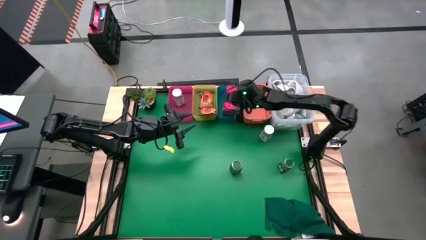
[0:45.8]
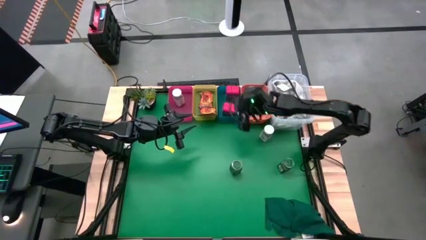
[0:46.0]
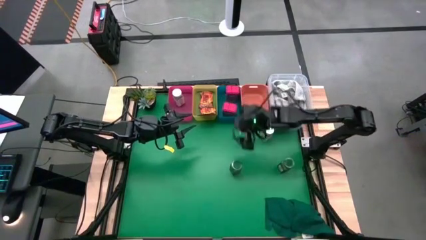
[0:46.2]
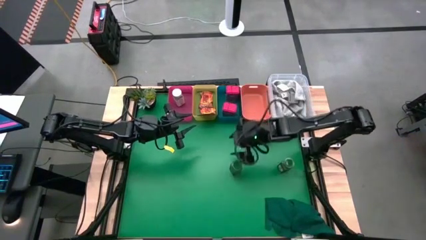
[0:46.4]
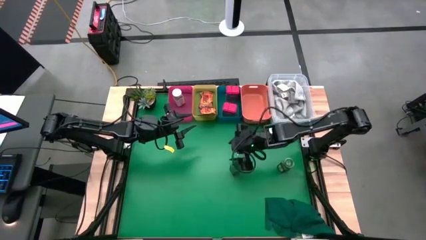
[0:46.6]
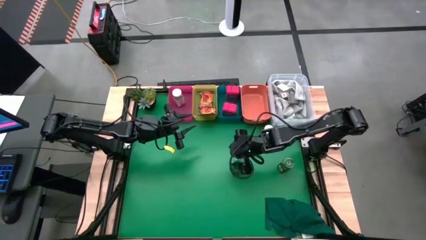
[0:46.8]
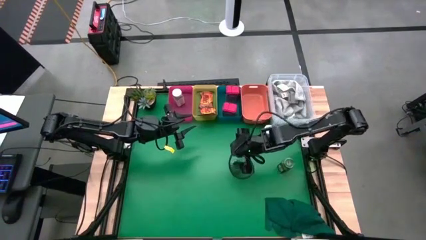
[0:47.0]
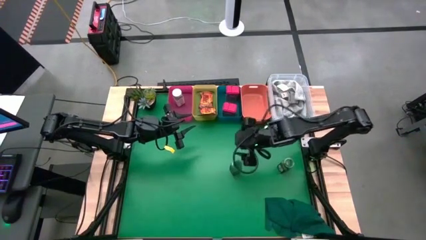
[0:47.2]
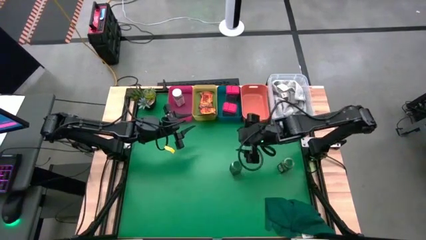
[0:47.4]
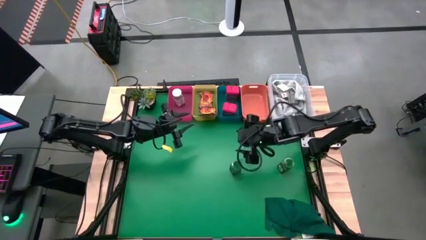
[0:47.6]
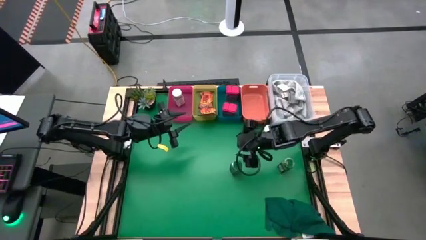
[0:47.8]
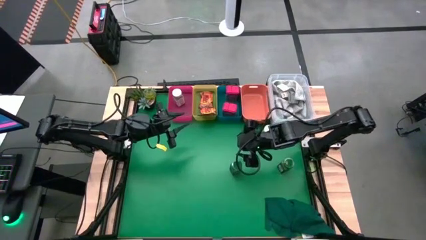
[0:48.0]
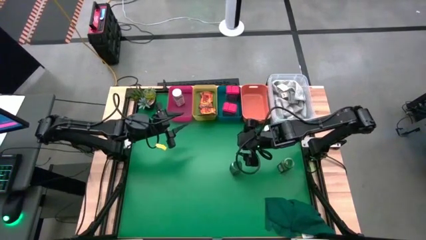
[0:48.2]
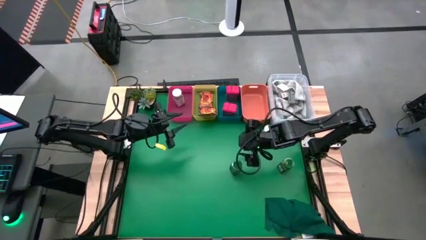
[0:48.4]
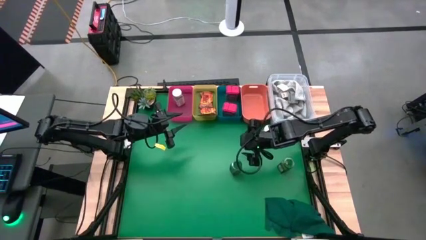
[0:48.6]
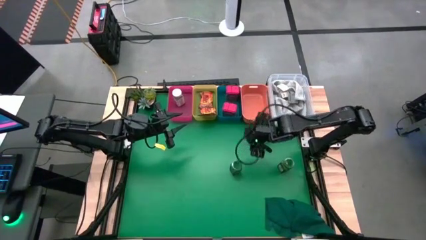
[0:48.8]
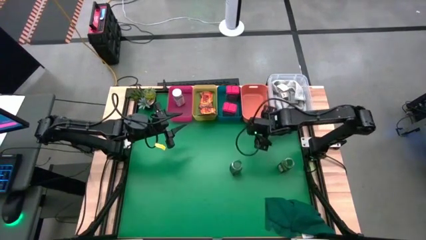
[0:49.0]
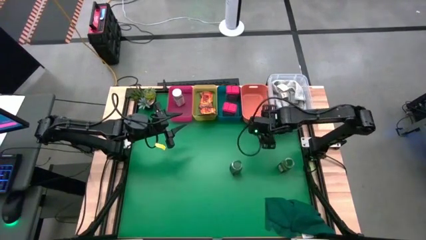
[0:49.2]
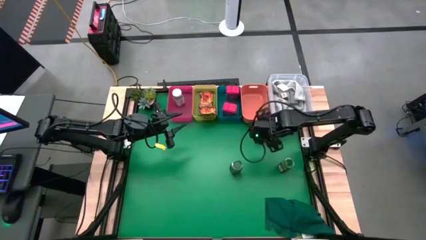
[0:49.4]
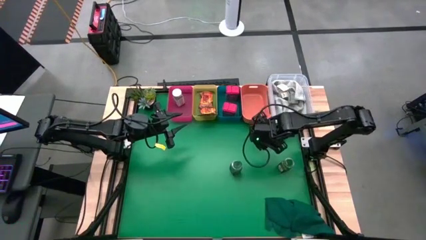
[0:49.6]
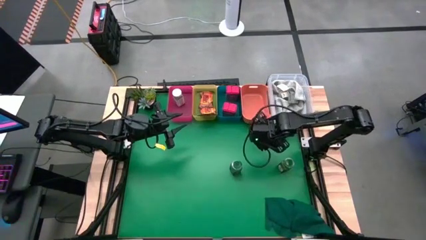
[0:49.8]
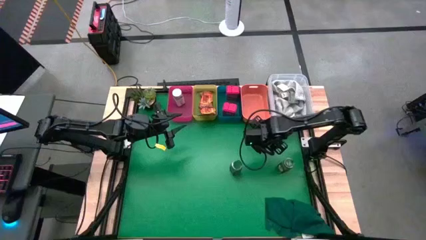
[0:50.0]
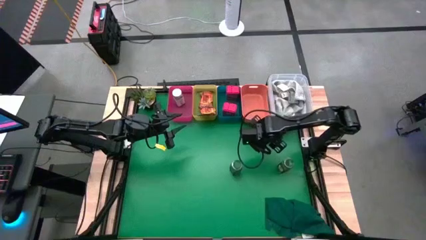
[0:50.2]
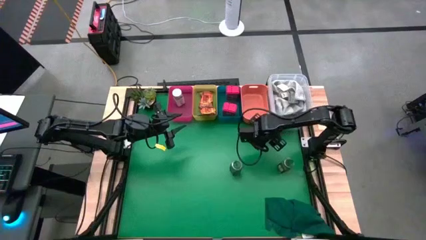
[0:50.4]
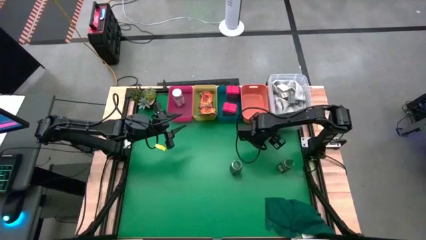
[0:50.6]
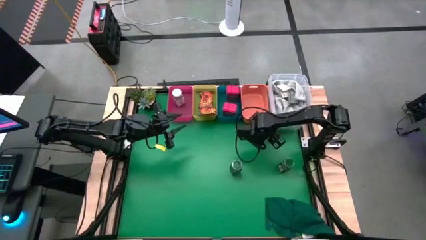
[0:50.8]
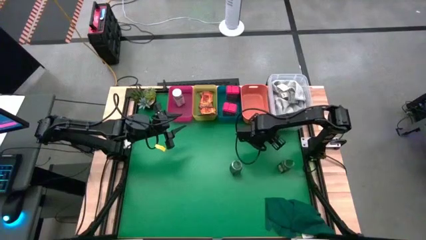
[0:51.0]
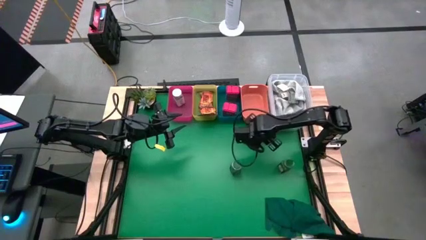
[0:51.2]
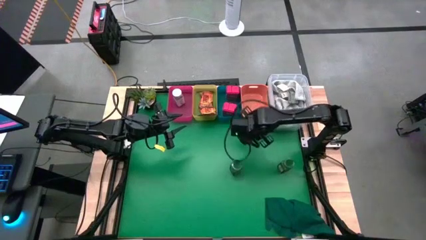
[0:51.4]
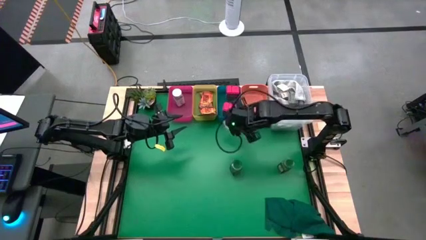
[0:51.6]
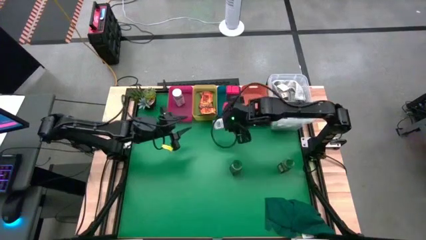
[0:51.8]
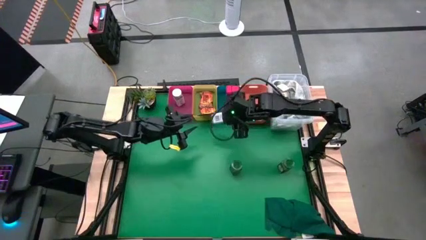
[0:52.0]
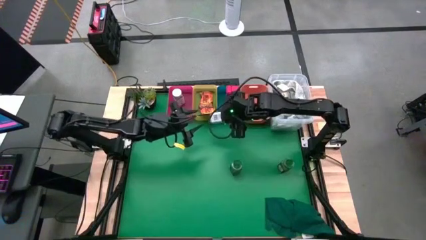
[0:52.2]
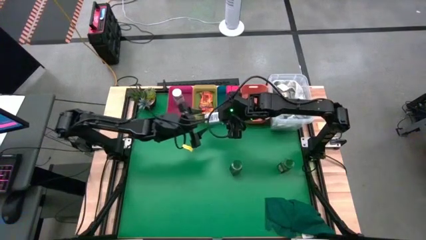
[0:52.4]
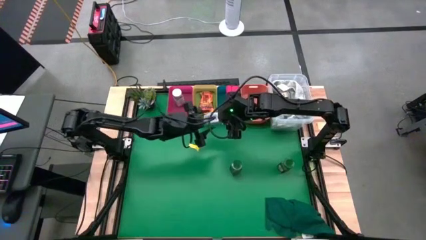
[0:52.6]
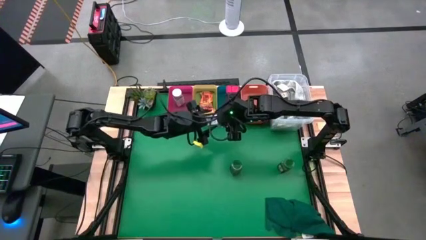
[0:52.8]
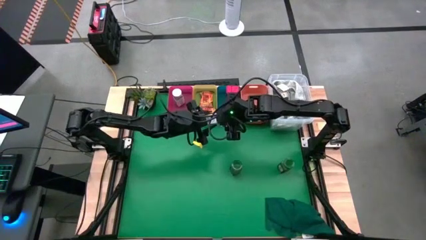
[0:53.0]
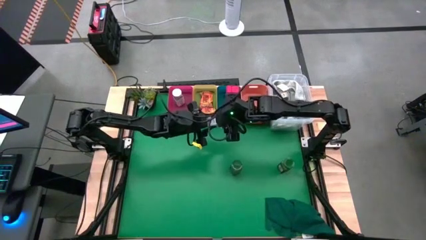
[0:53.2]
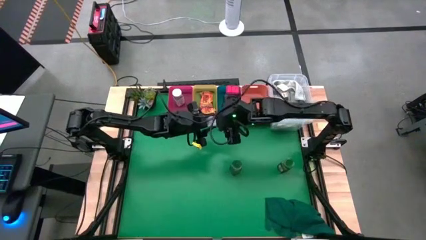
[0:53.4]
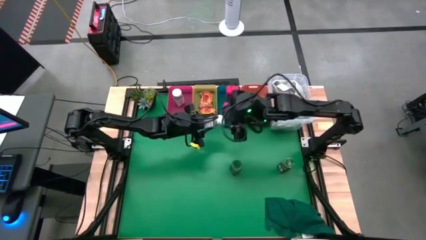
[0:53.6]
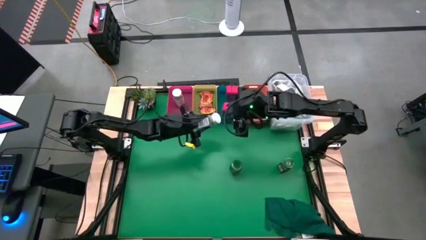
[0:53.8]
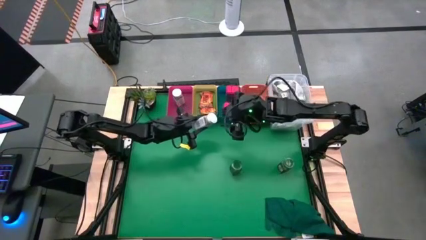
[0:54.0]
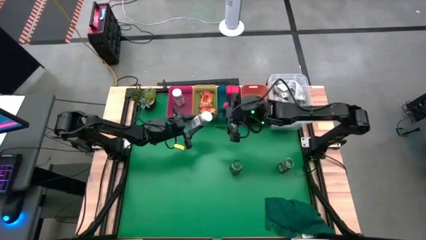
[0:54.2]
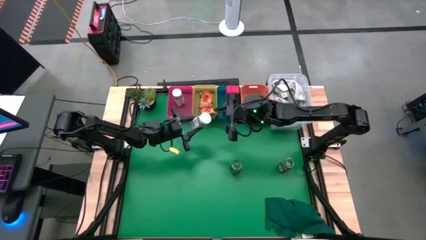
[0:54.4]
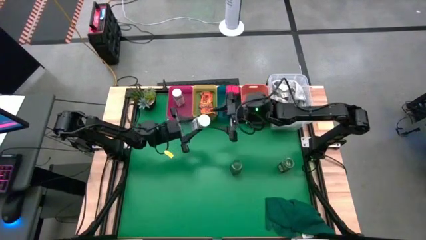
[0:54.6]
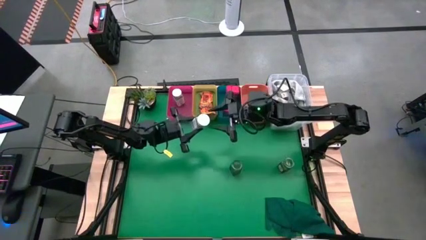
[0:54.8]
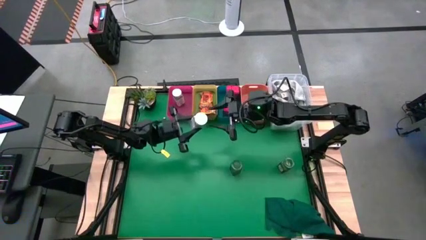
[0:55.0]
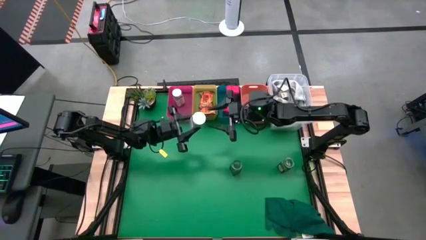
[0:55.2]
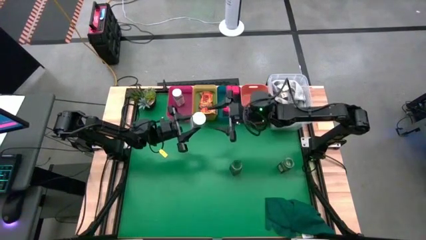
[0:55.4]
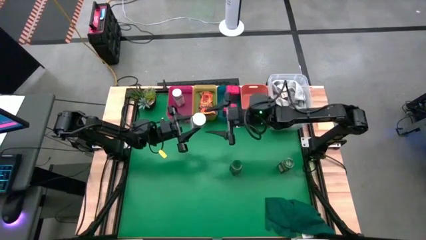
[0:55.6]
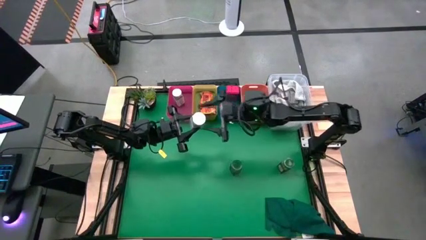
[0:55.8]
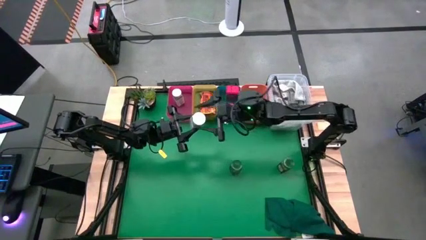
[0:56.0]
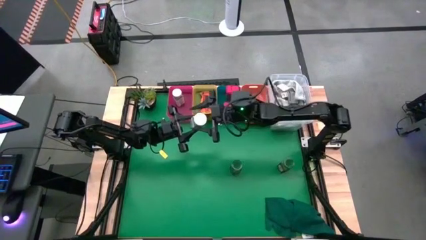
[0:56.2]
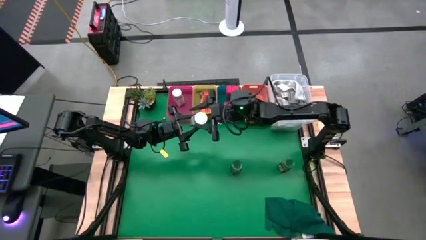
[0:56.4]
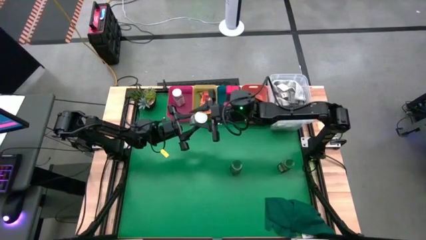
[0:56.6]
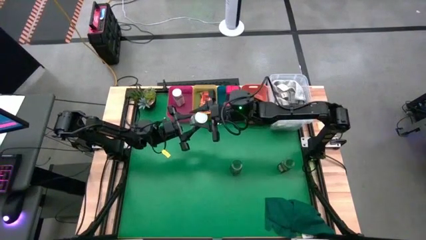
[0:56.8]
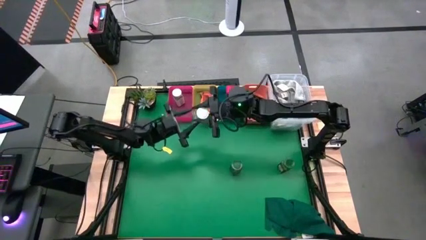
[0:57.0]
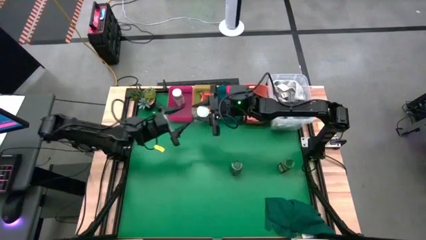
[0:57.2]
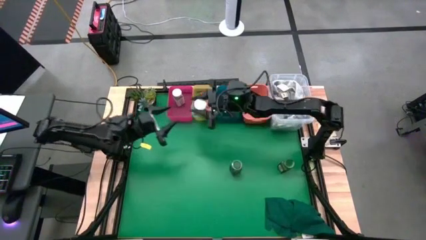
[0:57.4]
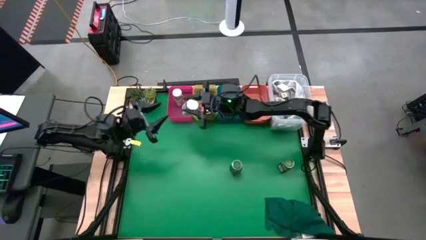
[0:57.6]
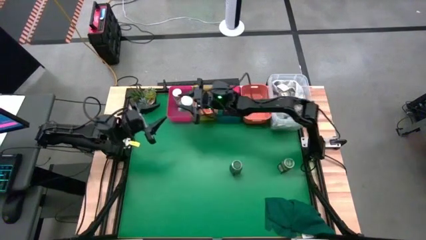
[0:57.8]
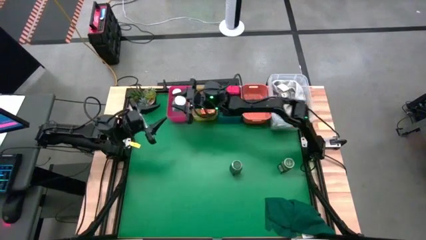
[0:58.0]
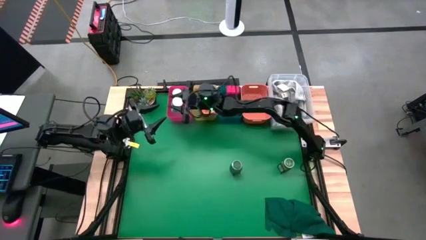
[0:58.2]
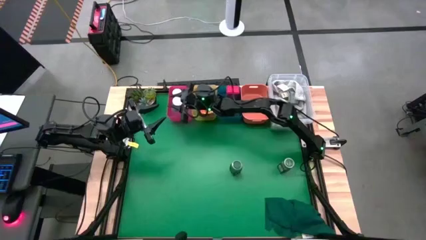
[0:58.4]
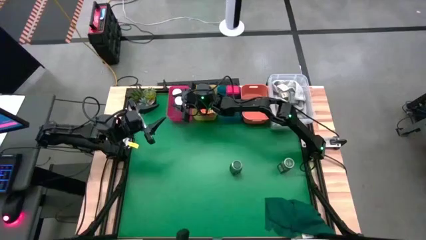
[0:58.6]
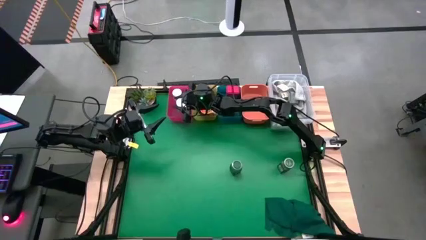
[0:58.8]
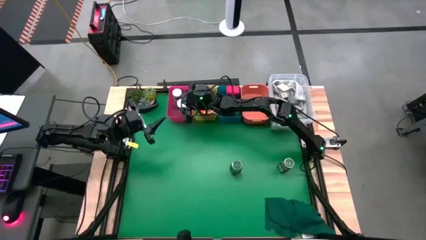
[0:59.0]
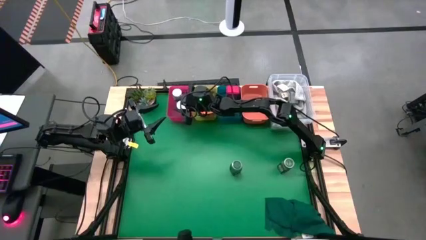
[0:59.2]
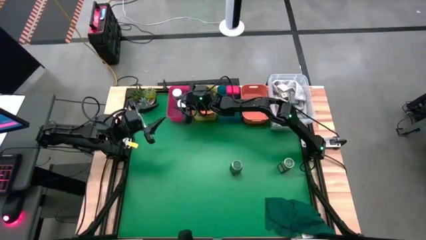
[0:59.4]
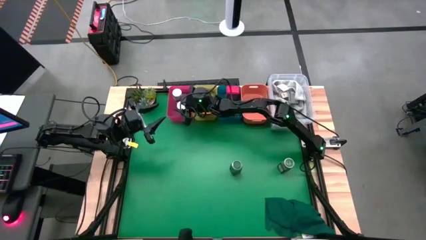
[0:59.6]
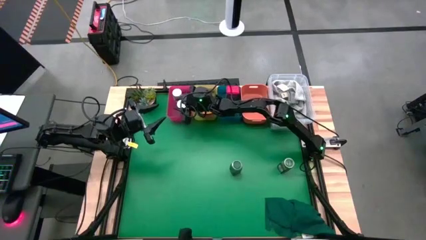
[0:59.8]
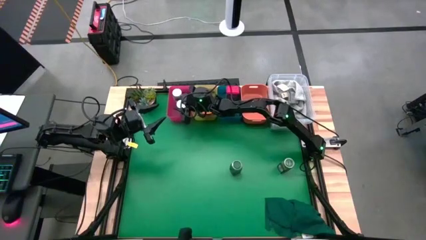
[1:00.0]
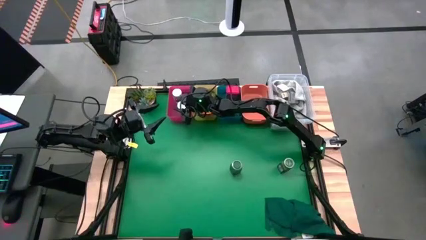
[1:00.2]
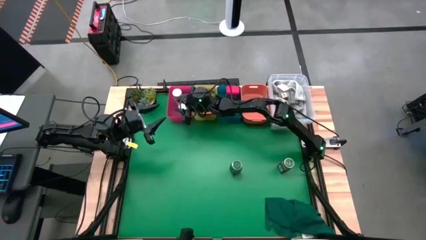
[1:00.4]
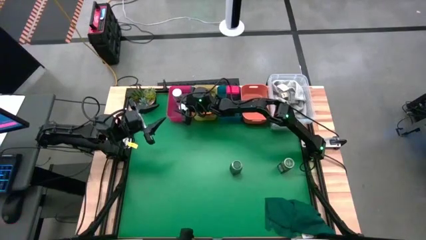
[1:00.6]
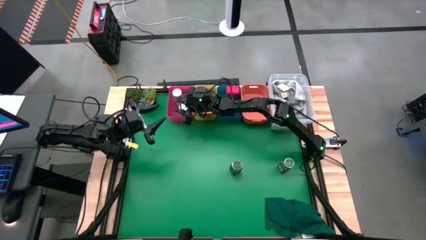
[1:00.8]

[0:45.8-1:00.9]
Task: Sort spices by type
Put the white seasoning bottle into the red bin
